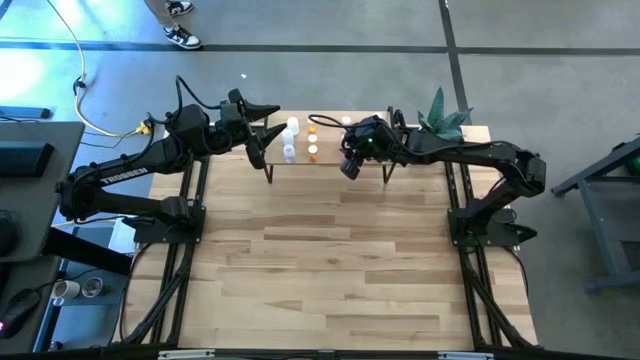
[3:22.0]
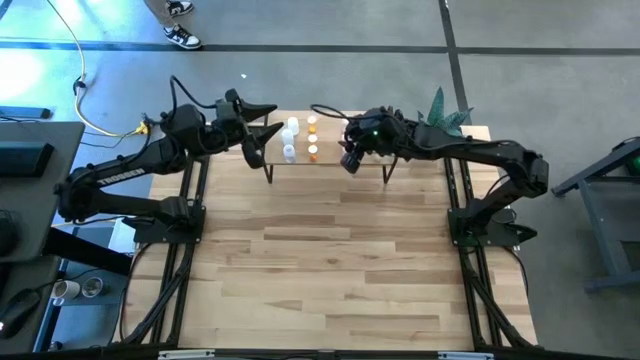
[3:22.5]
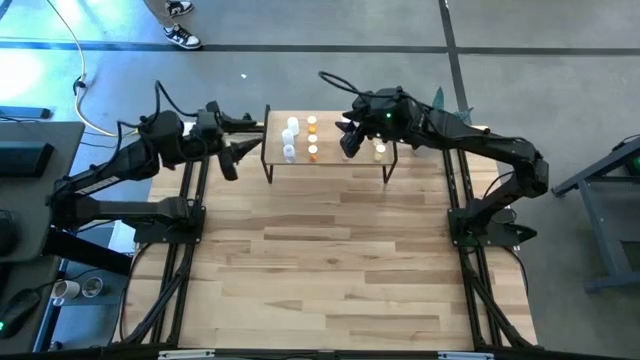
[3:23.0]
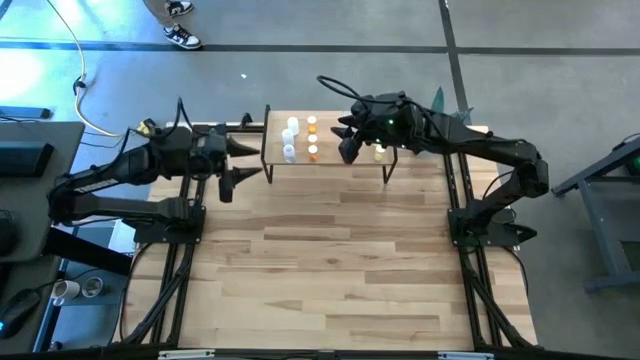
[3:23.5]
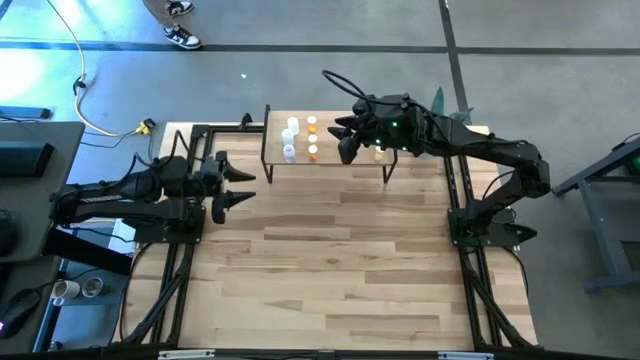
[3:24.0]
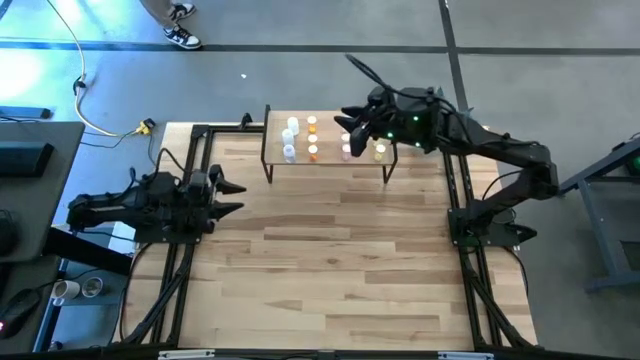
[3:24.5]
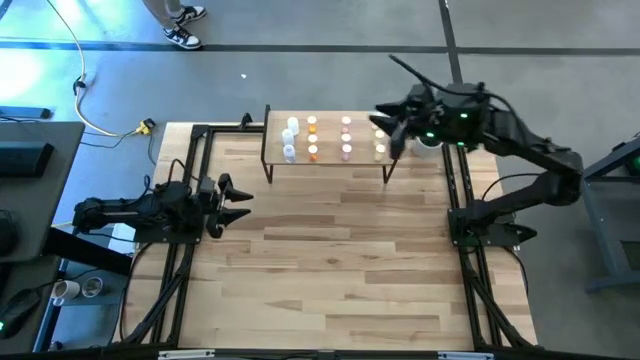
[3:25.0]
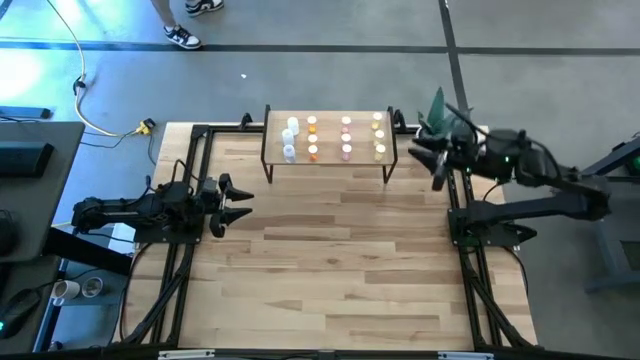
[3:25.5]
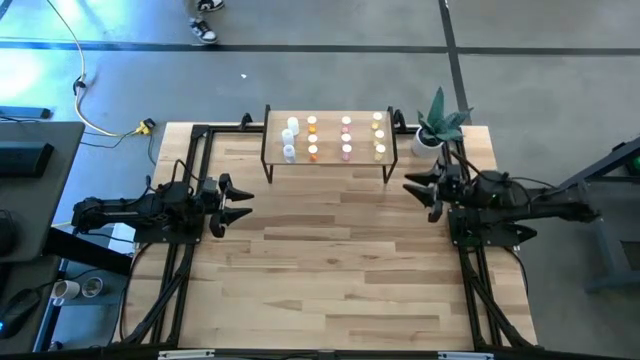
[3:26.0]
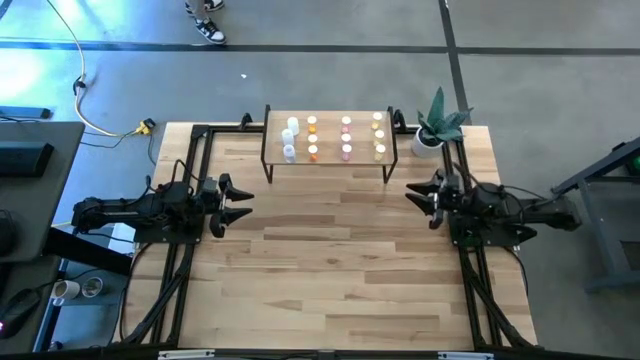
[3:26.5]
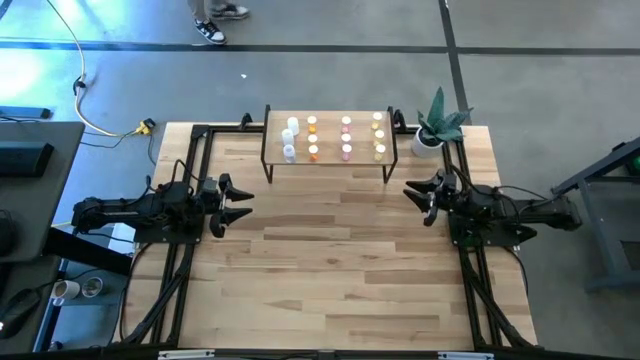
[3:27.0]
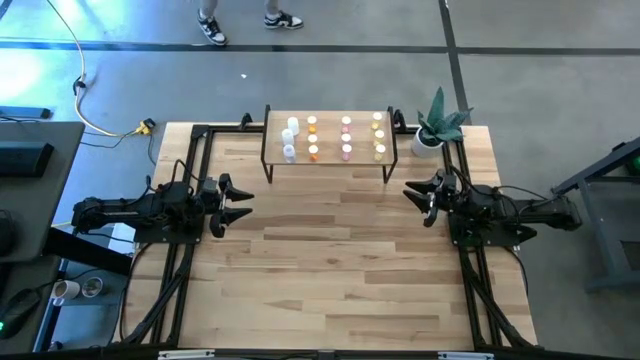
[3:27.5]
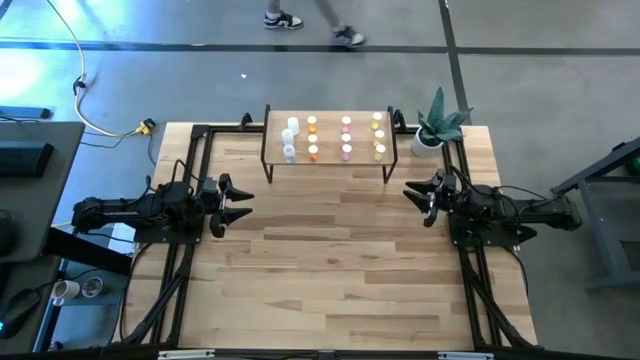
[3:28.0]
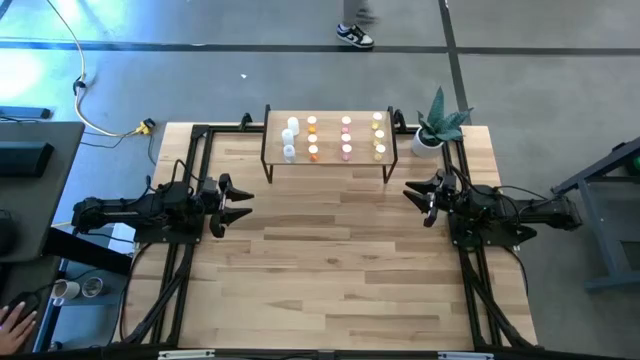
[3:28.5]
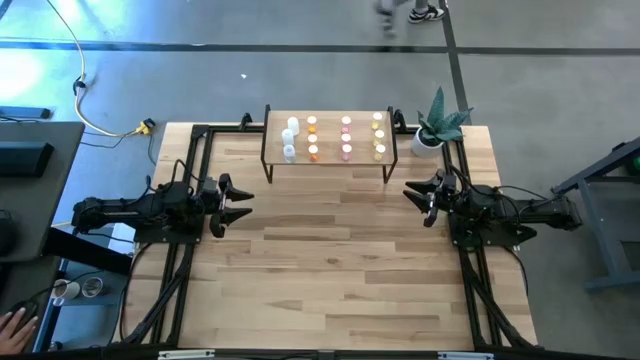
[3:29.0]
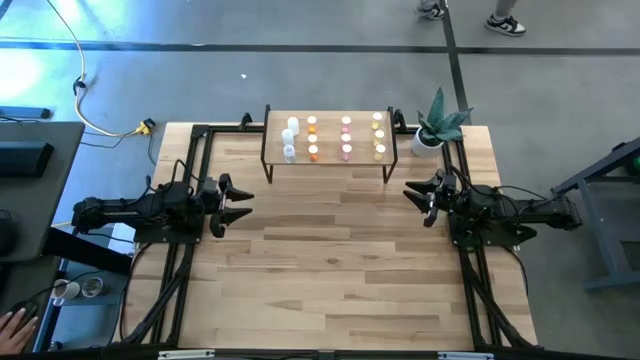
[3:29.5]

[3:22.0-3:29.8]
Task: Pick and place medicine bottles onto shelf by color
Return to Home Position

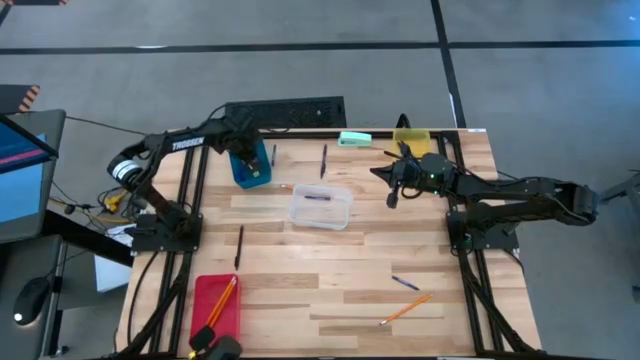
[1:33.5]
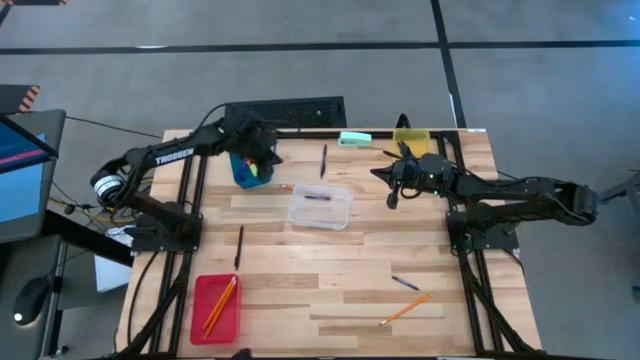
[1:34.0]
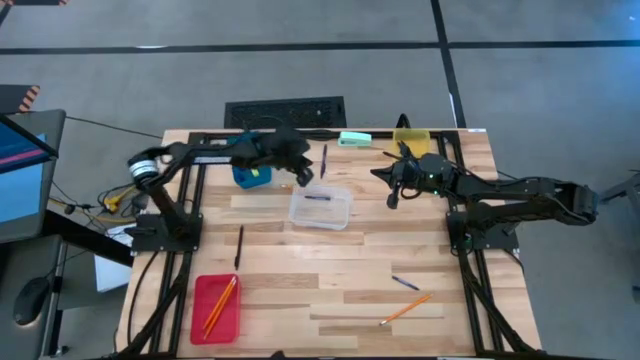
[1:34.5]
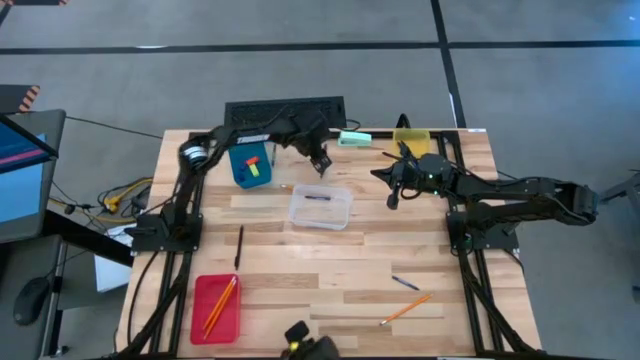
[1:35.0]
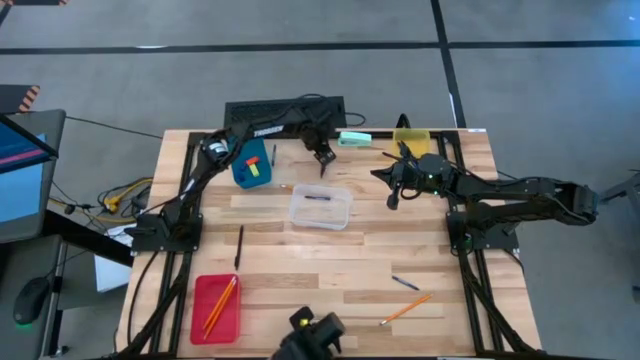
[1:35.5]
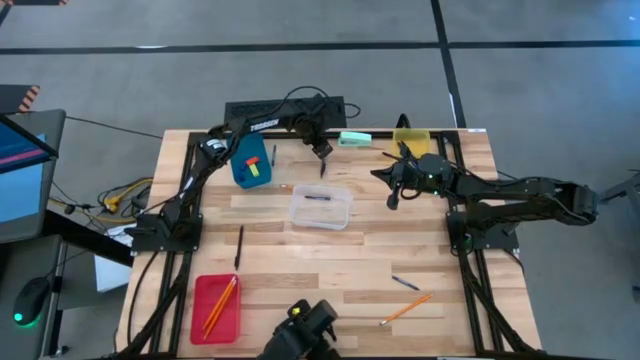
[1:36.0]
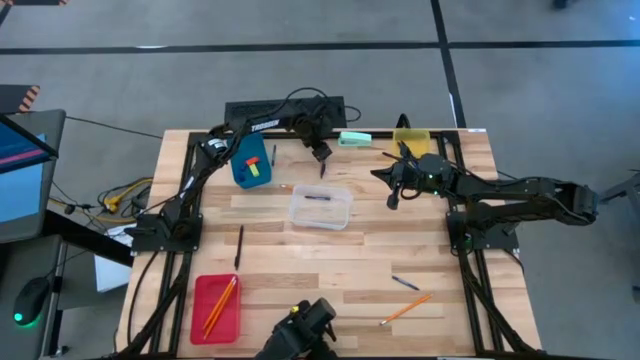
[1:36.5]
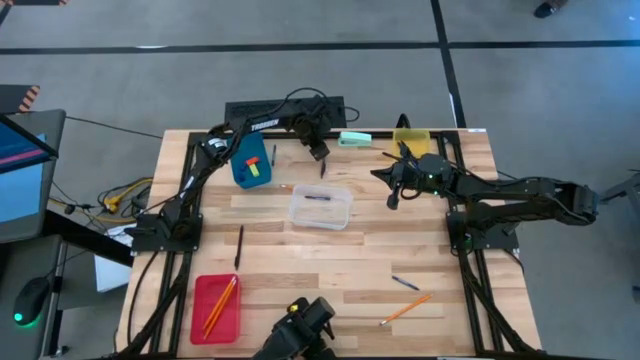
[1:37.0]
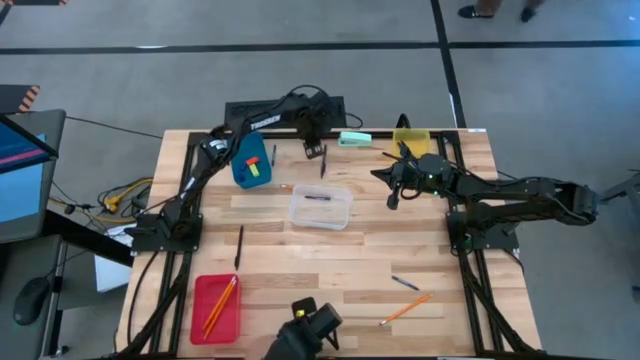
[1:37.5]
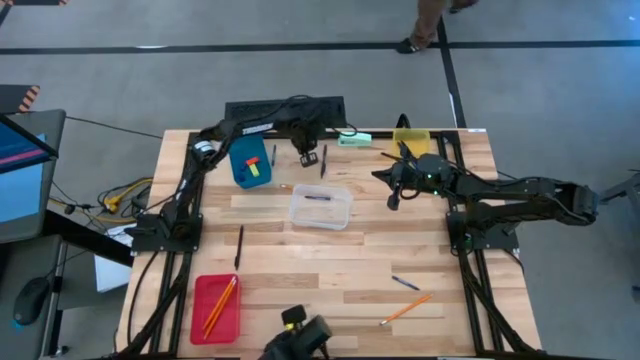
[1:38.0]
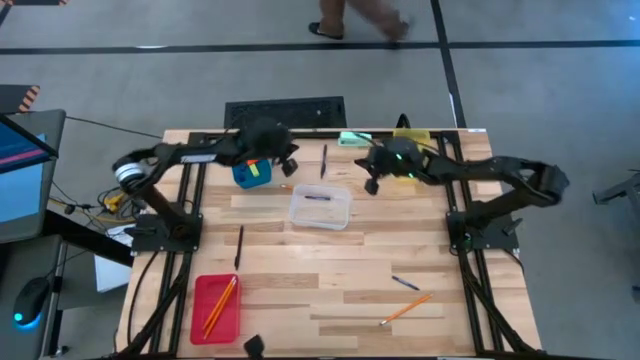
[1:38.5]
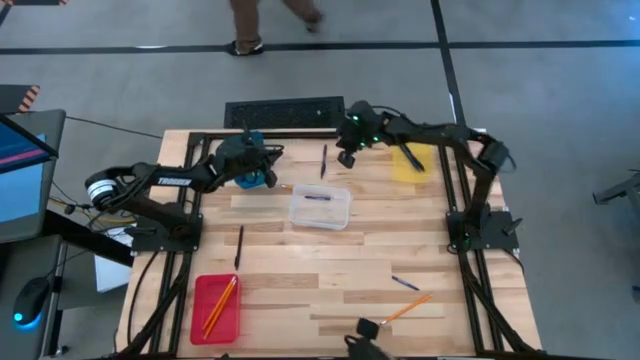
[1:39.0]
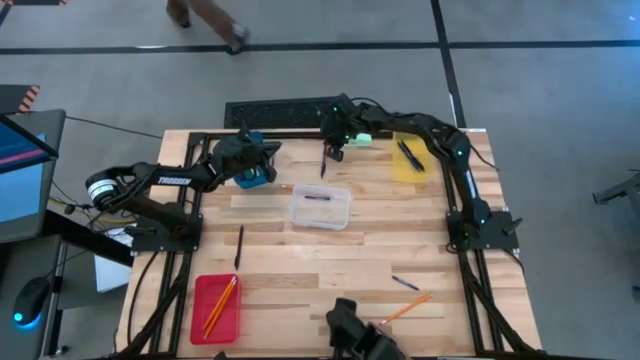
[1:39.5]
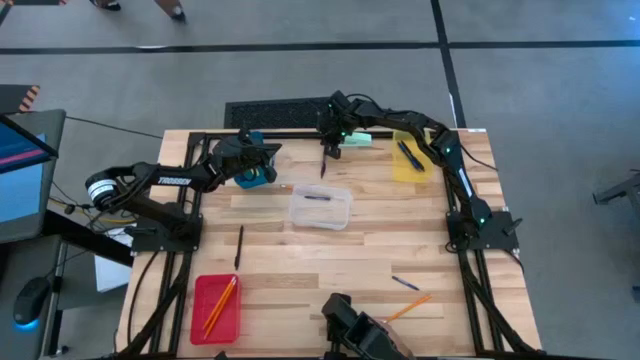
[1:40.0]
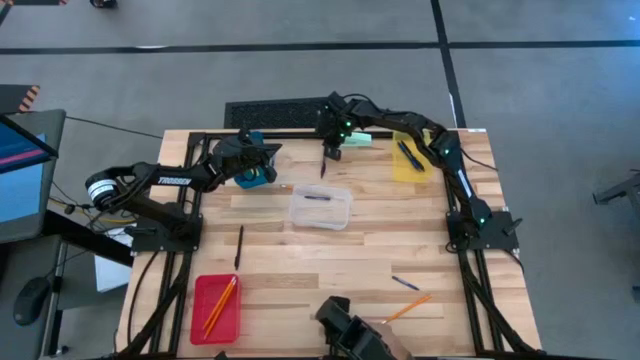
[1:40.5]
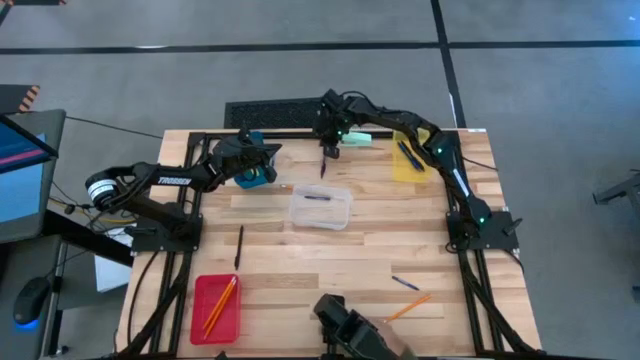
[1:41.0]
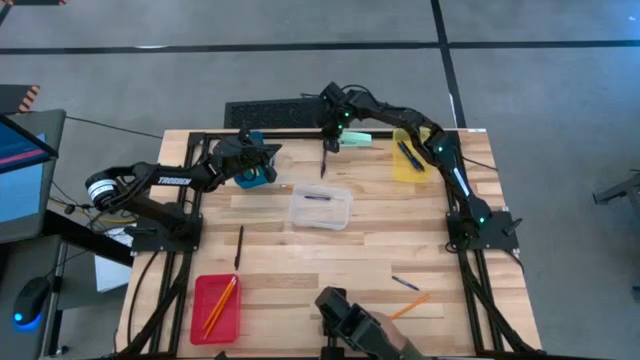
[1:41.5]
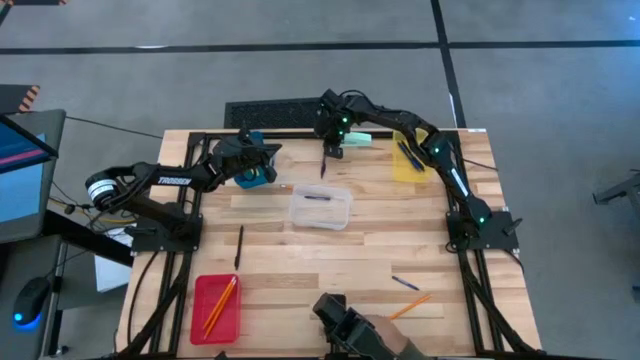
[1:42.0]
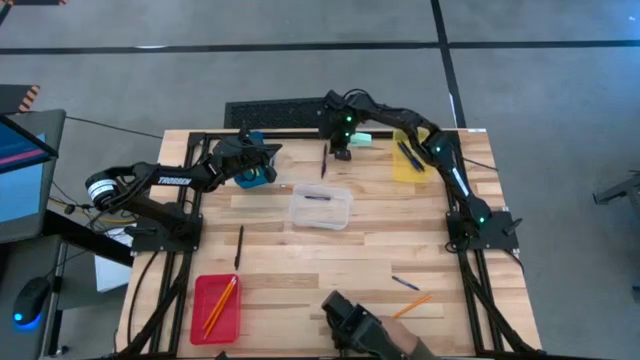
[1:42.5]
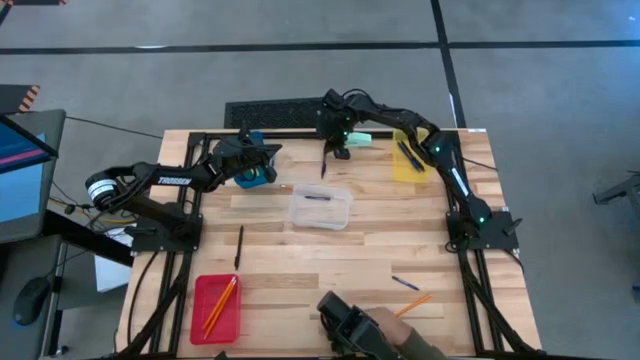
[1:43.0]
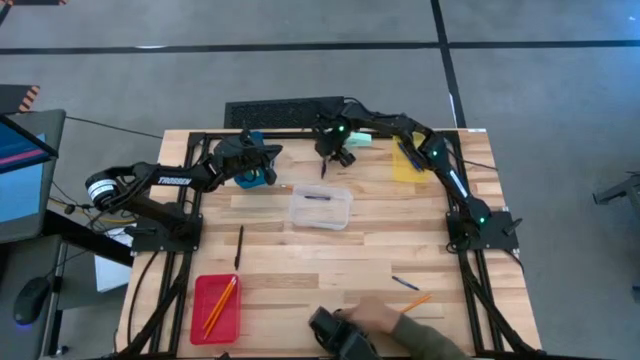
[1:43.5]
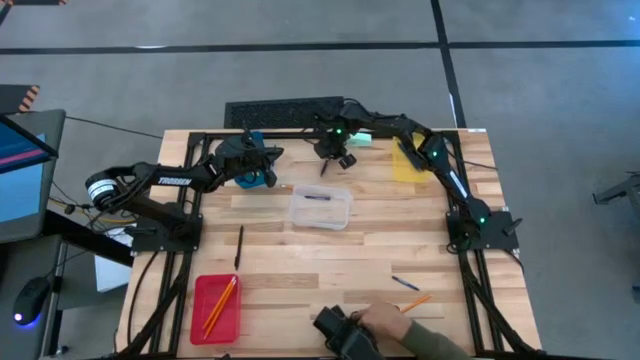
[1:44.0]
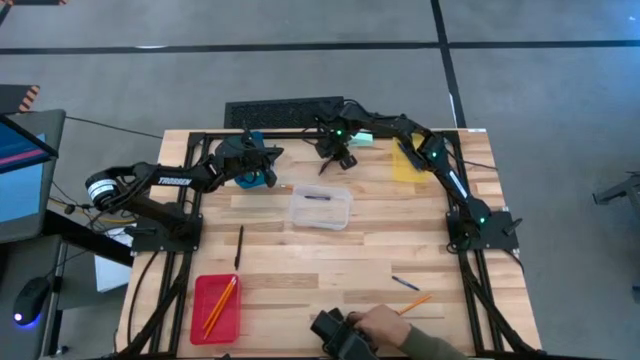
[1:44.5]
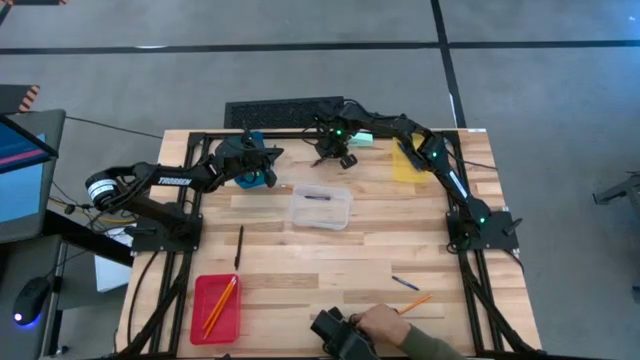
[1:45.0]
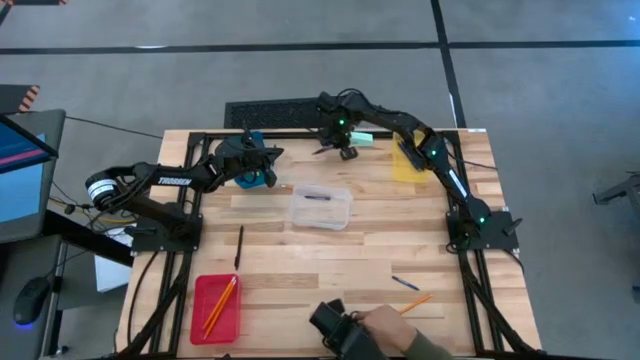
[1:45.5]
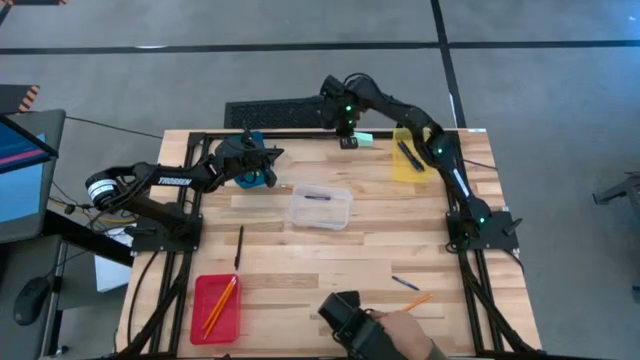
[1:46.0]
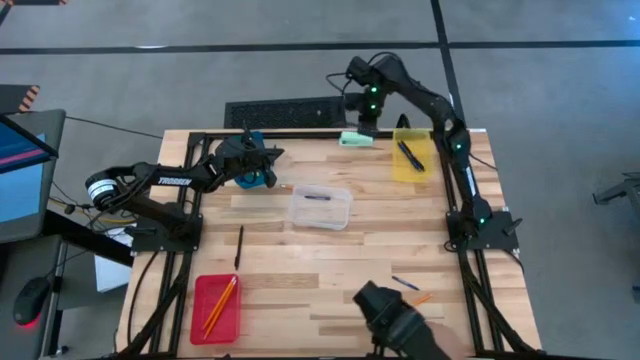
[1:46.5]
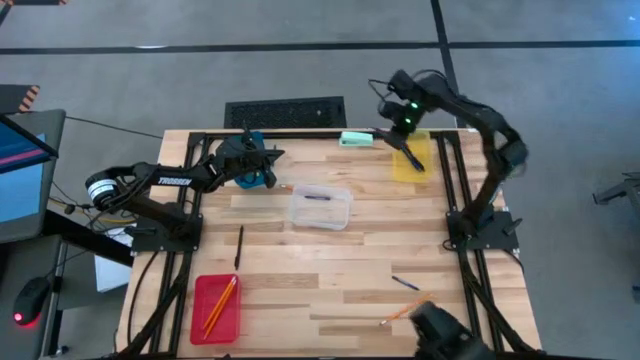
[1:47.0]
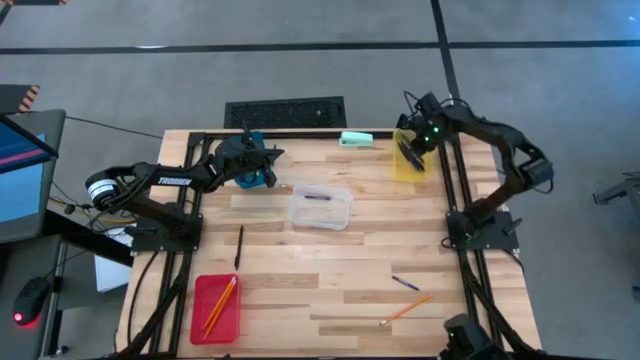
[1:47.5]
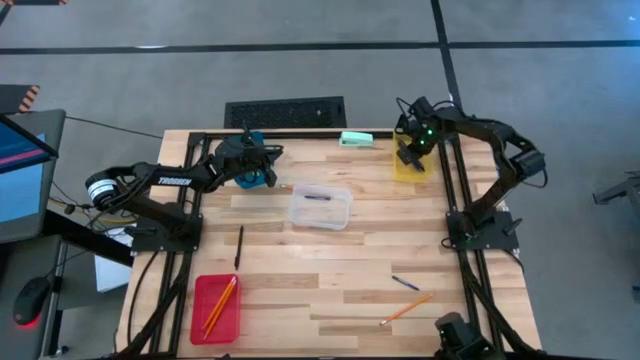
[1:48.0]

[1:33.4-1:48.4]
Task: Sort crayons/erasers/pens/pencils in bins
Put the violet pen into the yellow bin
